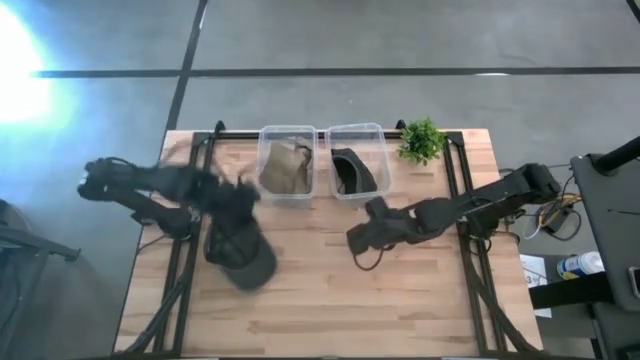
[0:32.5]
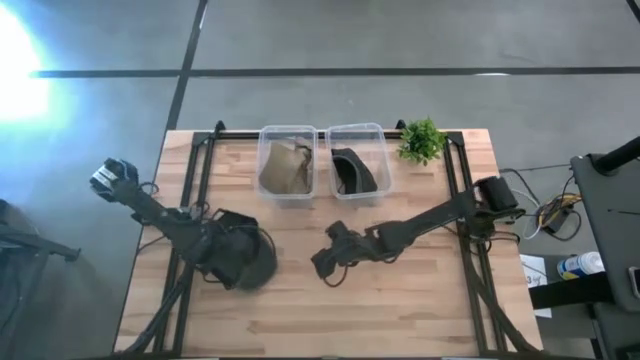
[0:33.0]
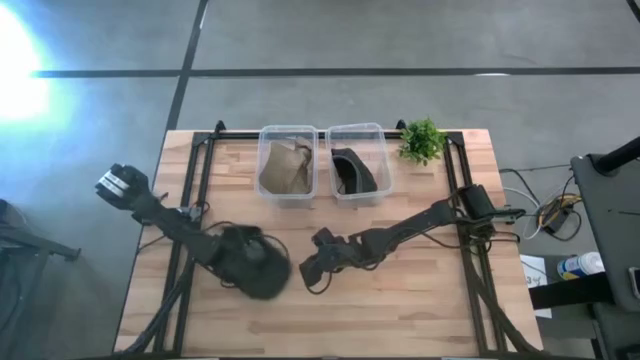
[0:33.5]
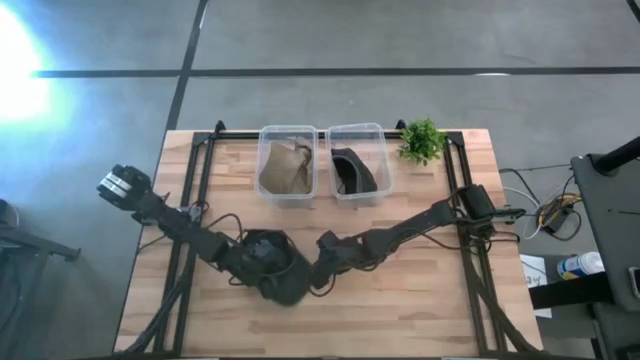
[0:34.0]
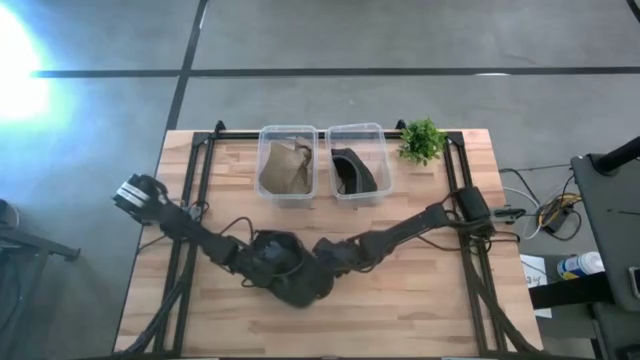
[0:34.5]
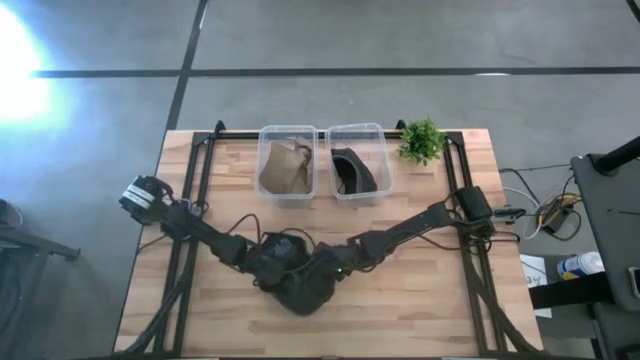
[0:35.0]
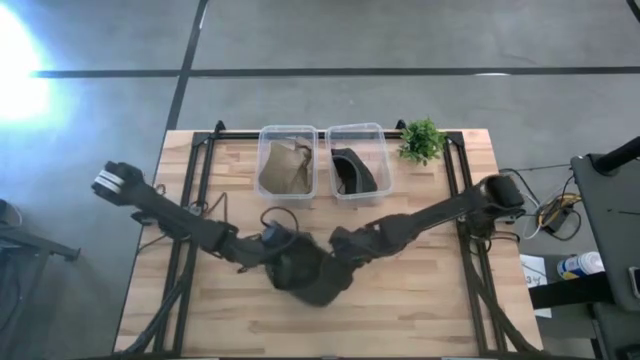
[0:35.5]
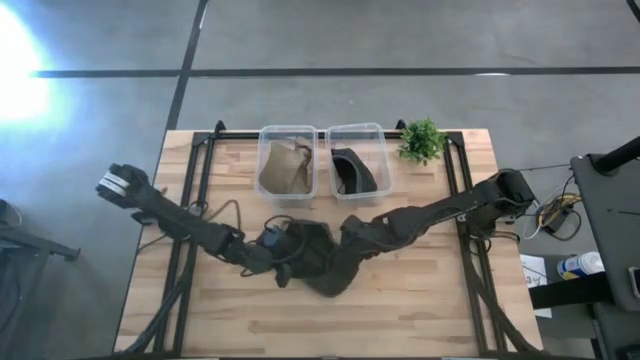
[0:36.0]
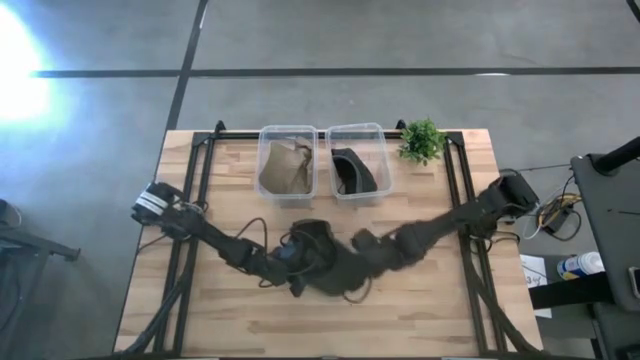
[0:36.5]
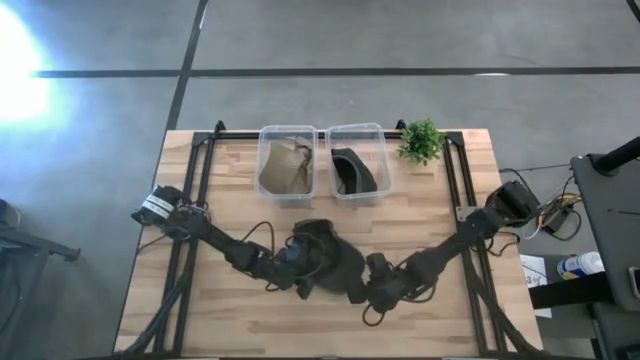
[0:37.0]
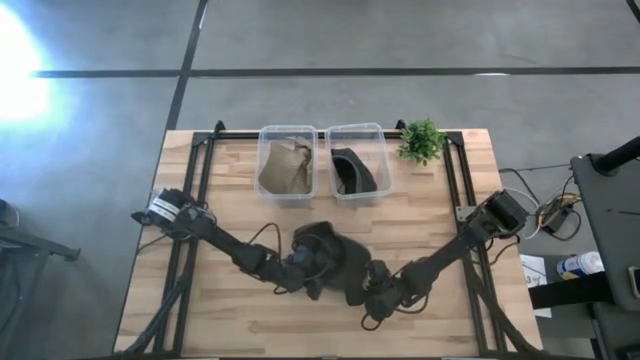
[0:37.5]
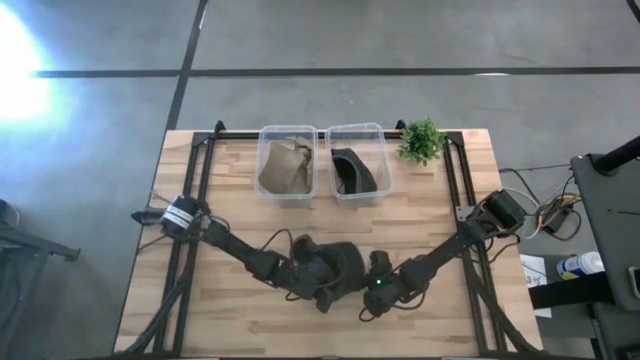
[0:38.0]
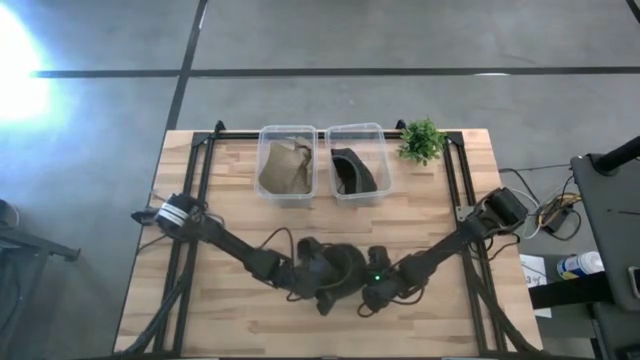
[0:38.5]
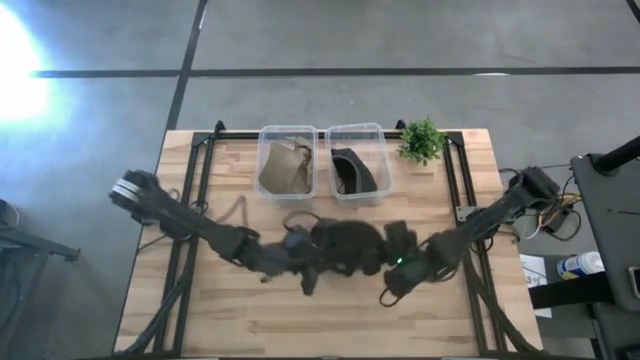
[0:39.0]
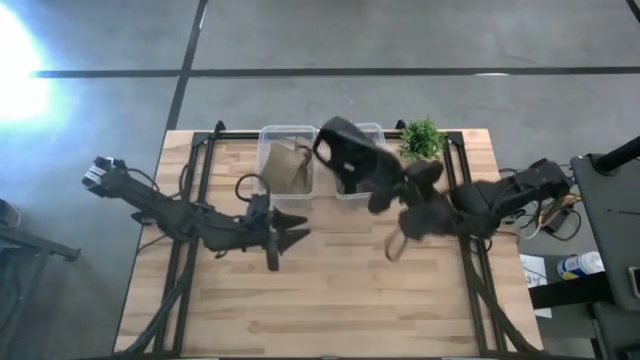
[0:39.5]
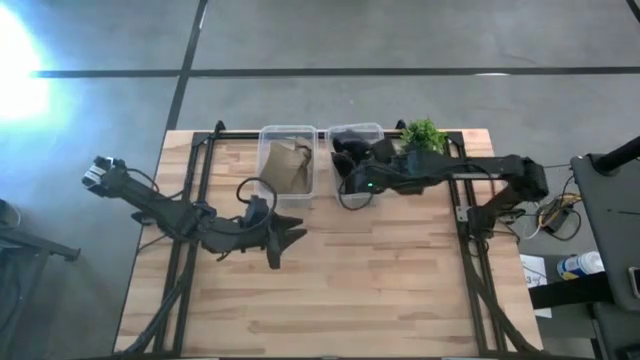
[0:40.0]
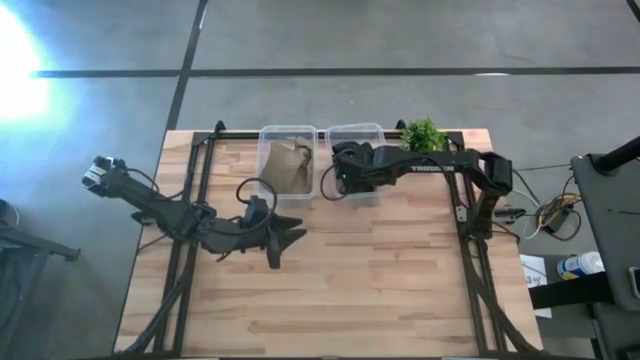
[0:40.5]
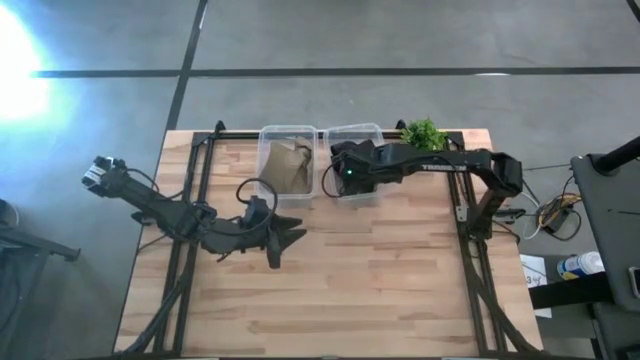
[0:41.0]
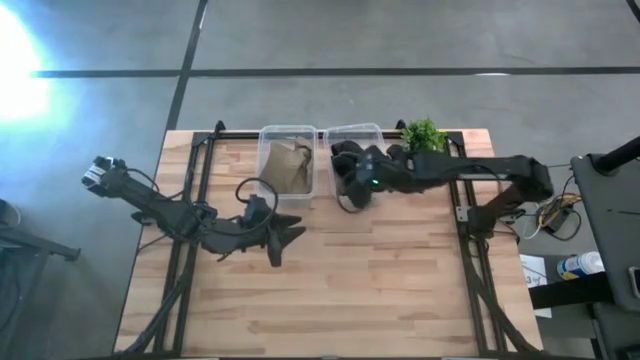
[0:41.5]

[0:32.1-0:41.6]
Task: Pick & Place hat
Put the black cap into the right transparent bin

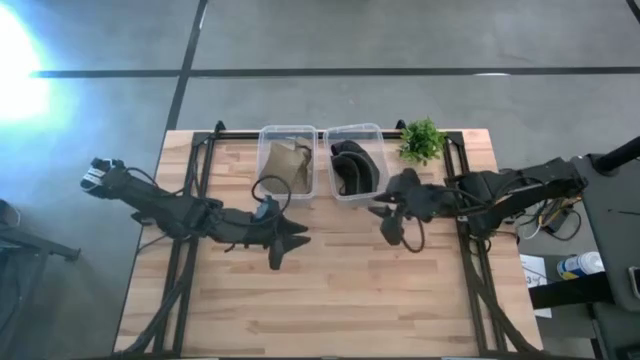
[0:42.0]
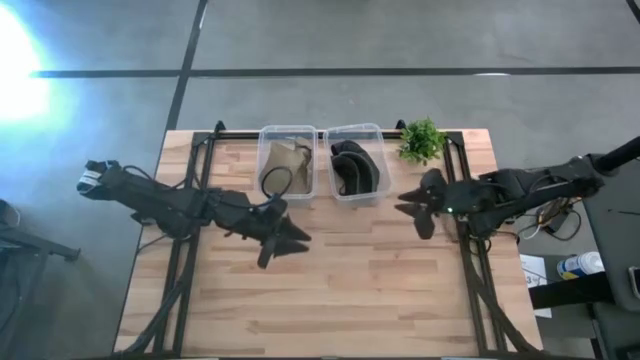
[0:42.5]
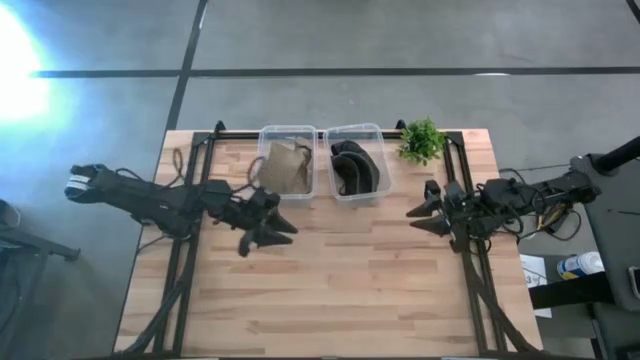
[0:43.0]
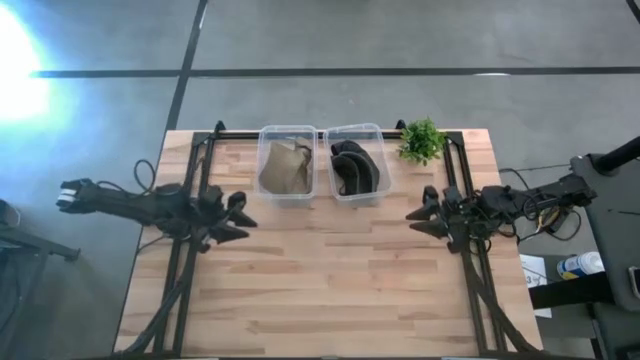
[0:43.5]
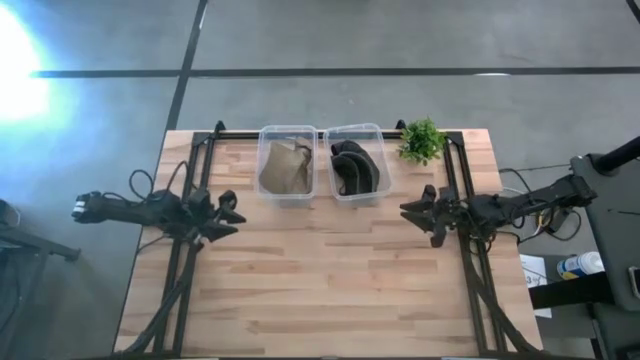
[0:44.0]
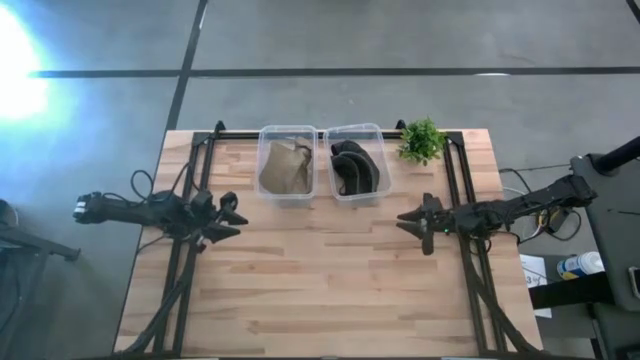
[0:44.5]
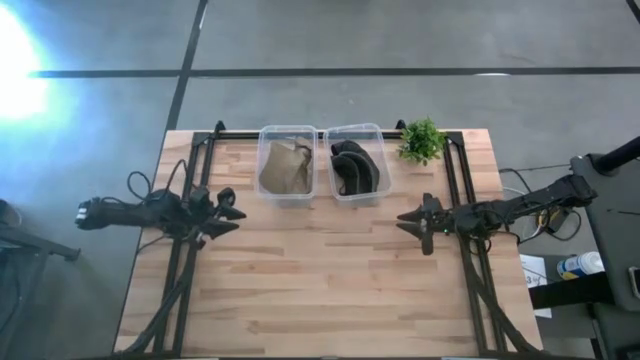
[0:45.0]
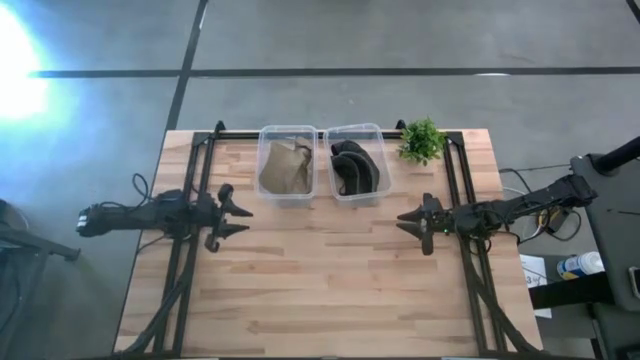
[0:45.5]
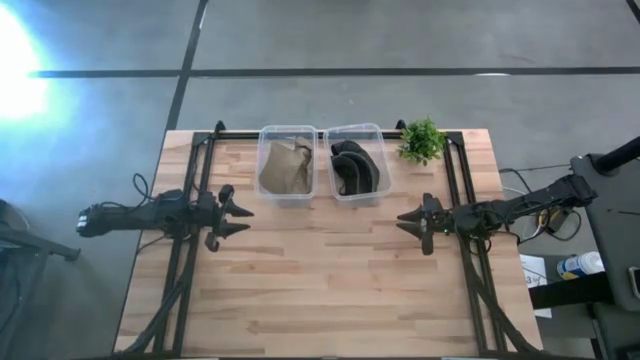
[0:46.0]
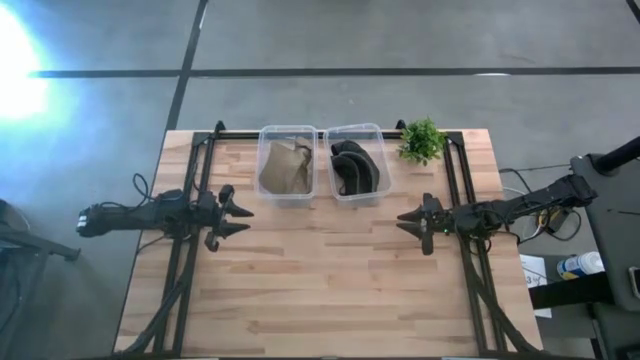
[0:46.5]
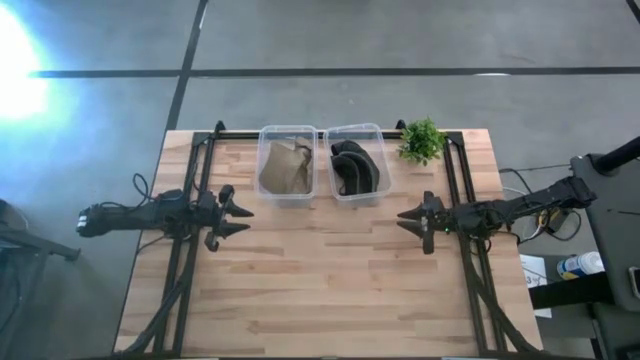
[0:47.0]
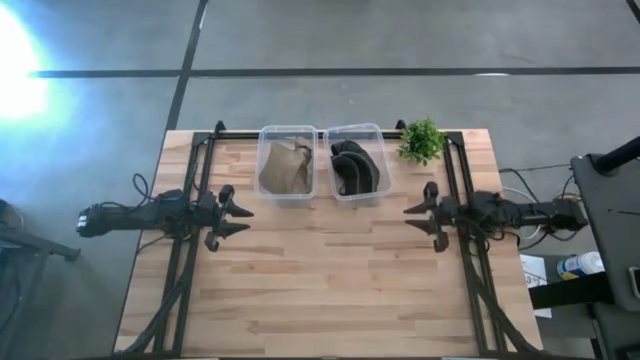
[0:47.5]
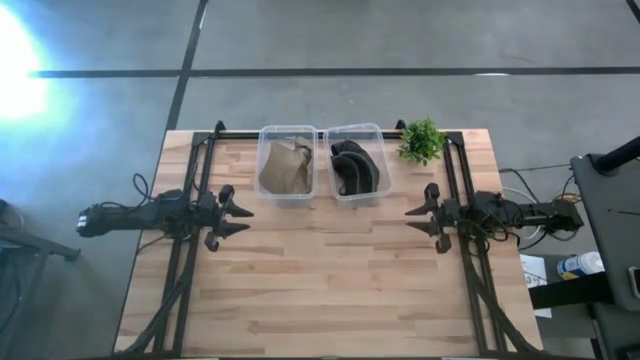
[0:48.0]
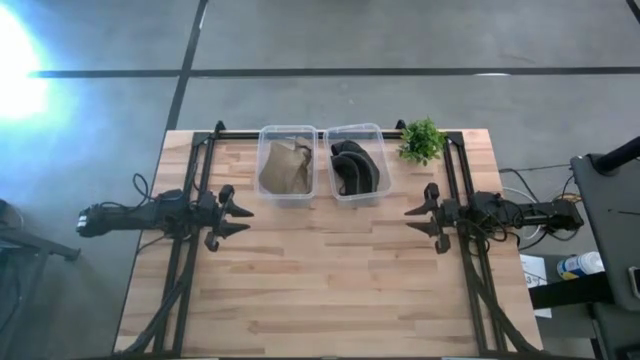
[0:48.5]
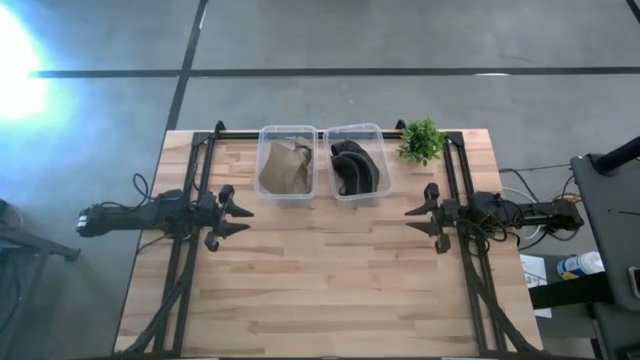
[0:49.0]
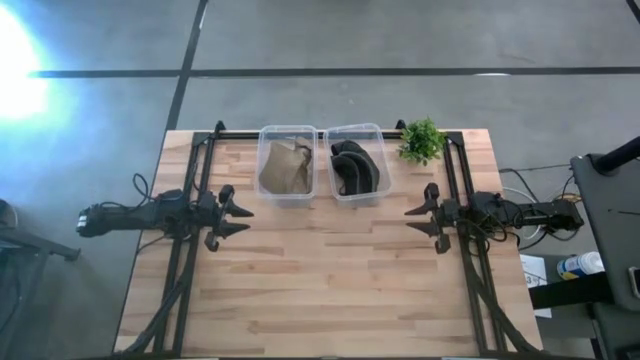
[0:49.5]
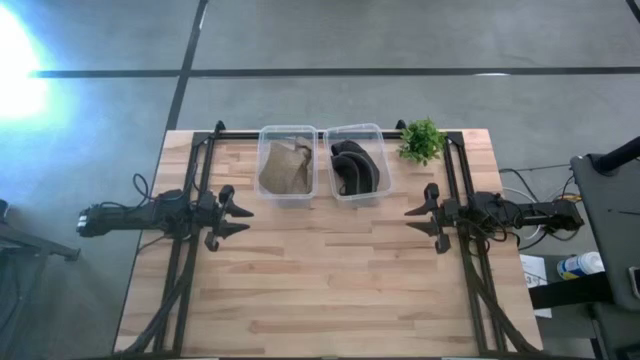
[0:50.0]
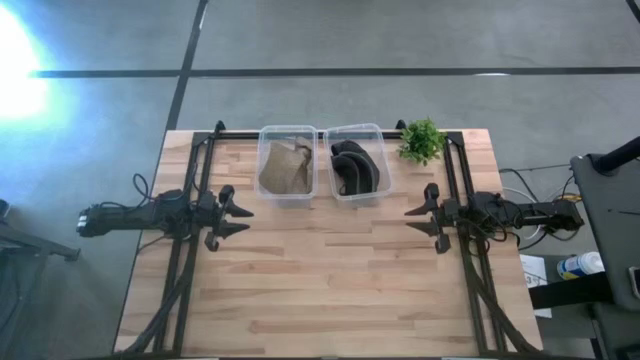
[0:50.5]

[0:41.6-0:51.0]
Return to Home Position

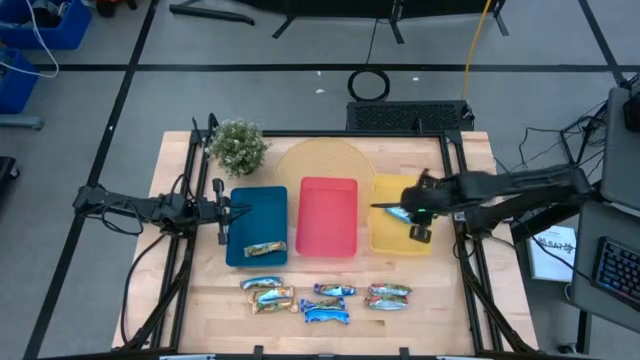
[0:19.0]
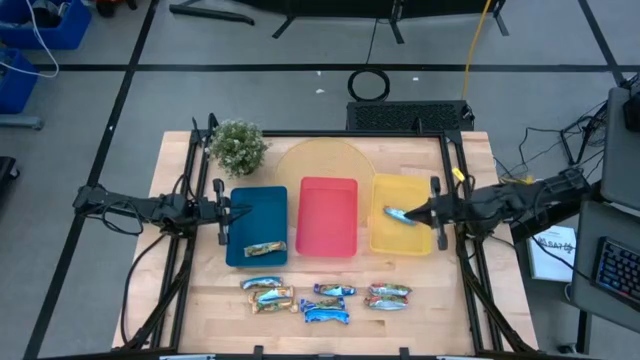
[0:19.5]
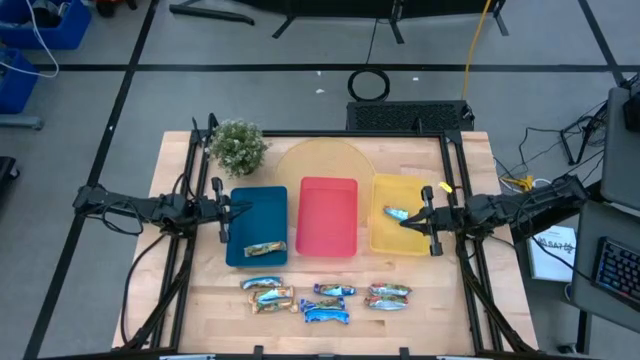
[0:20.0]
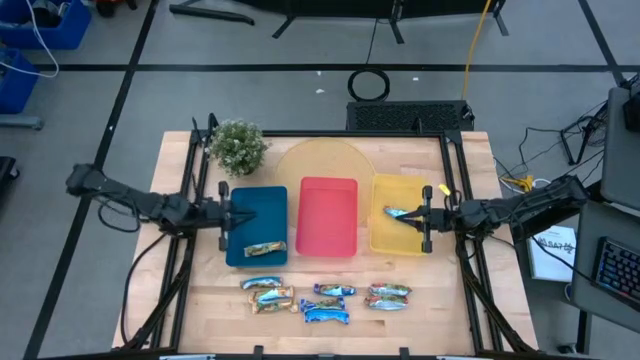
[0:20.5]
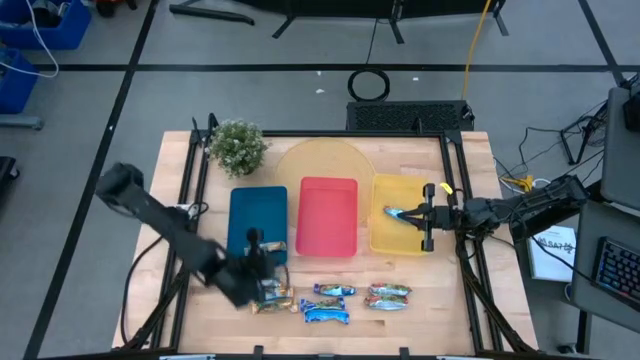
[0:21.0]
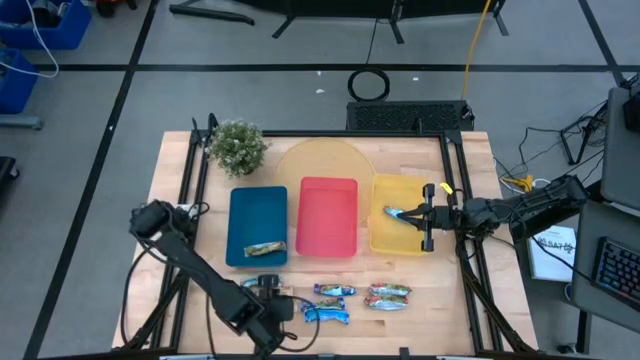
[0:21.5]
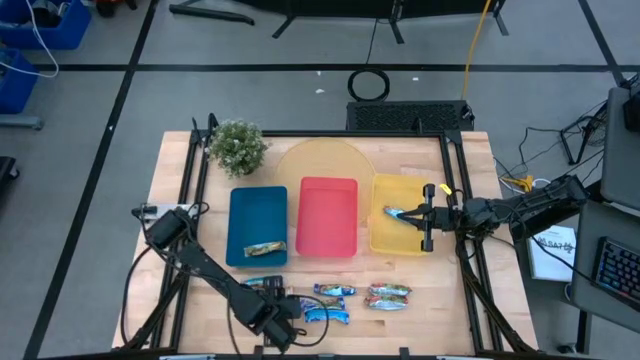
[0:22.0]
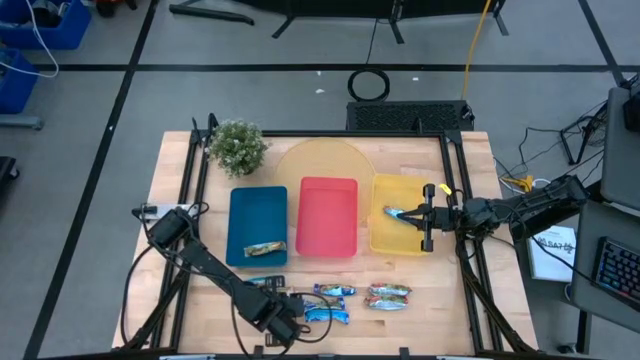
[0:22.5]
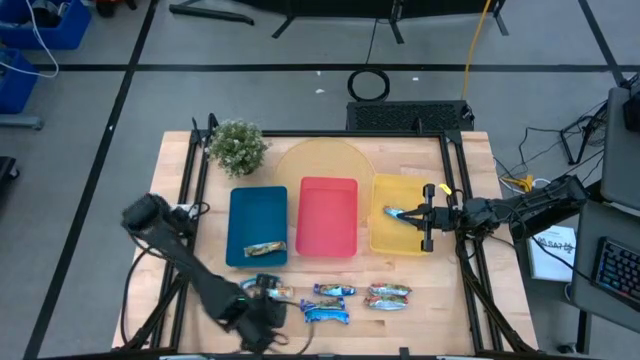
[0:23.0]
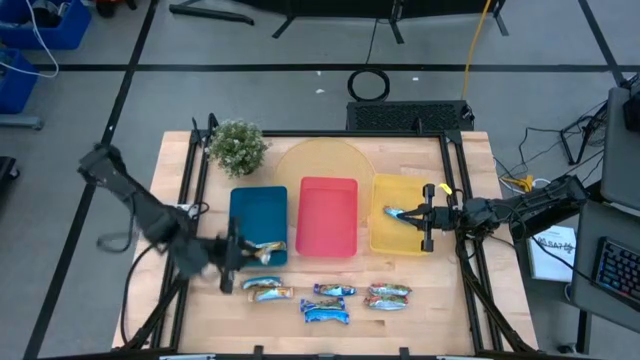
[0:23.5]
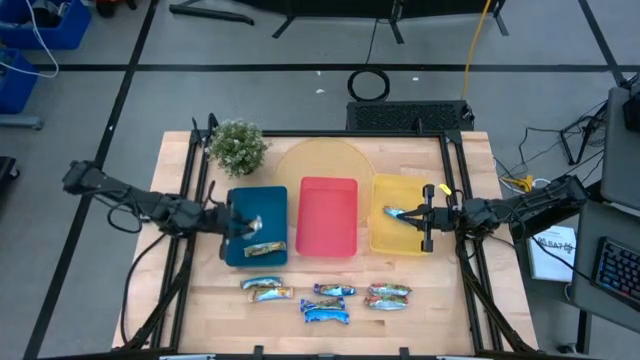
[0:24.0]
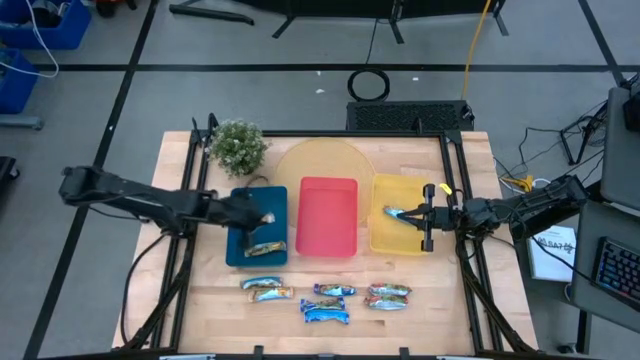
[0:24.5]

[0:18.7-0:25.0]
Task: Pick and place Granola Bars by type
Put the yellow granola bar into the blue bin
